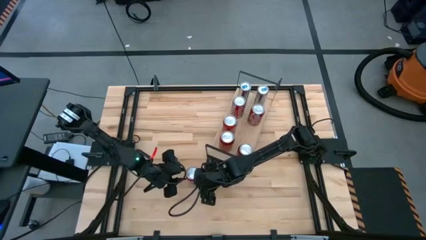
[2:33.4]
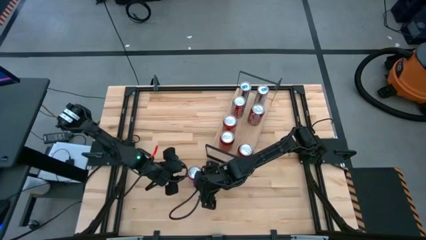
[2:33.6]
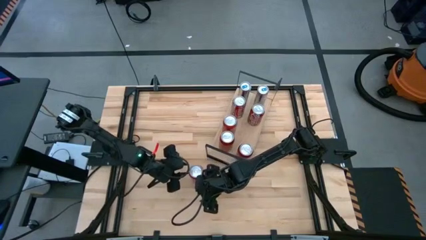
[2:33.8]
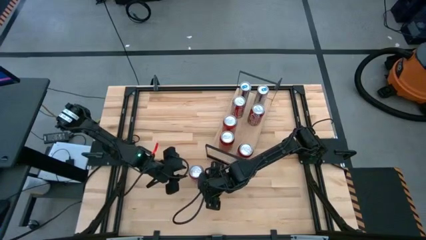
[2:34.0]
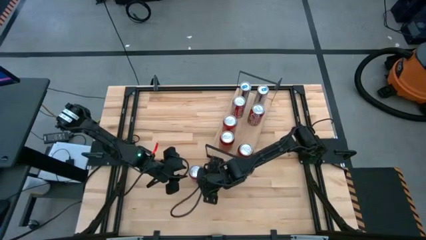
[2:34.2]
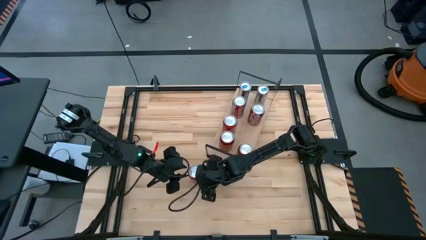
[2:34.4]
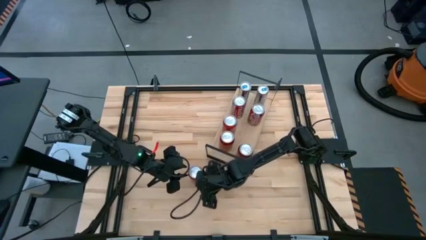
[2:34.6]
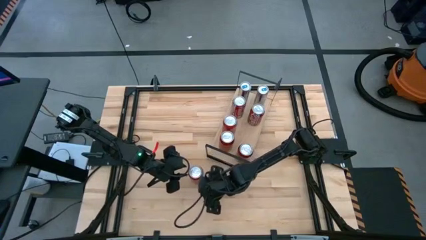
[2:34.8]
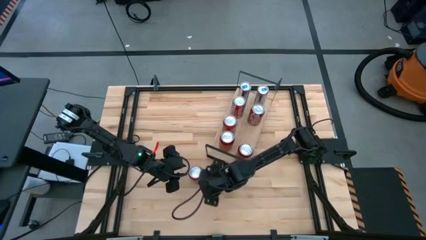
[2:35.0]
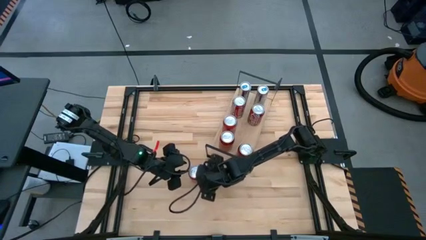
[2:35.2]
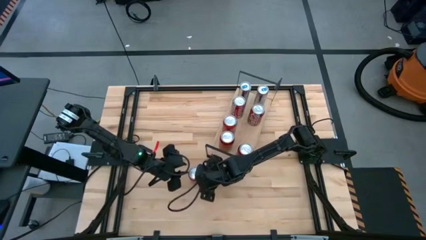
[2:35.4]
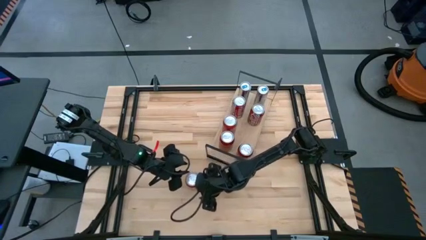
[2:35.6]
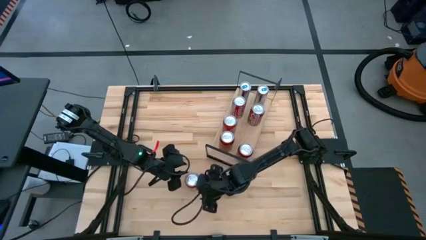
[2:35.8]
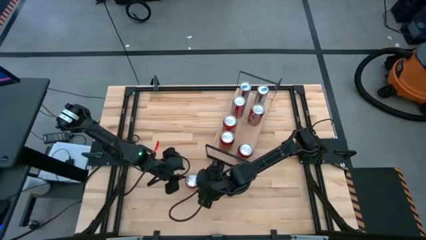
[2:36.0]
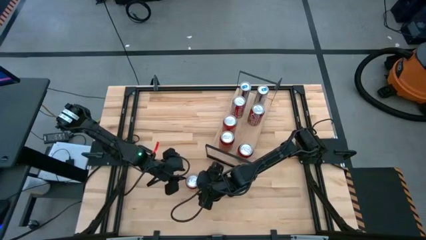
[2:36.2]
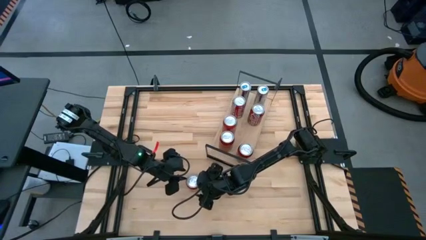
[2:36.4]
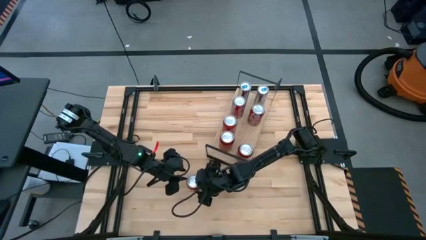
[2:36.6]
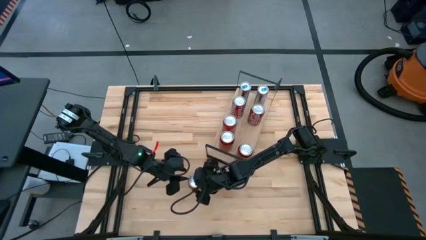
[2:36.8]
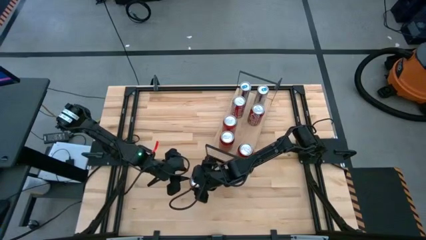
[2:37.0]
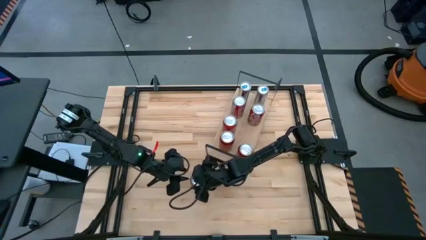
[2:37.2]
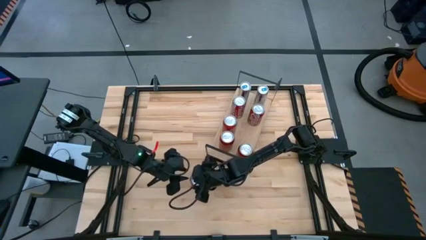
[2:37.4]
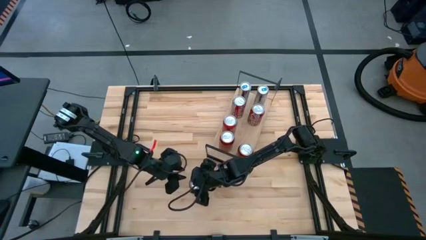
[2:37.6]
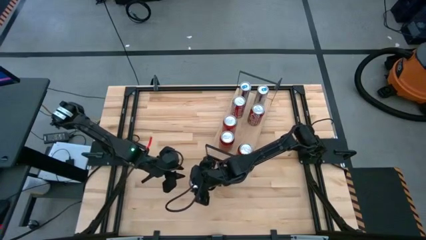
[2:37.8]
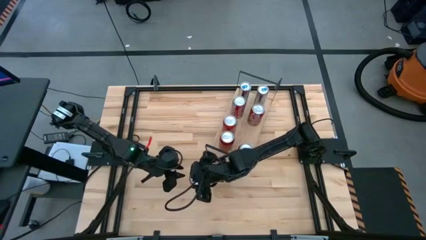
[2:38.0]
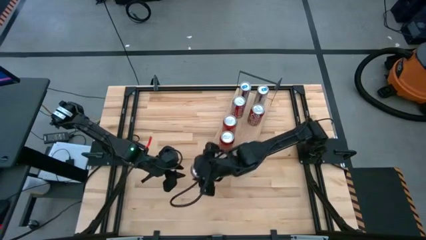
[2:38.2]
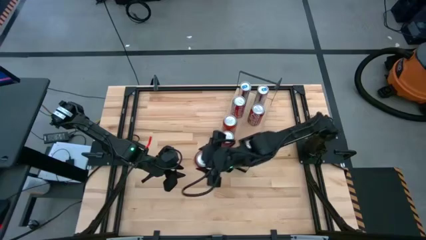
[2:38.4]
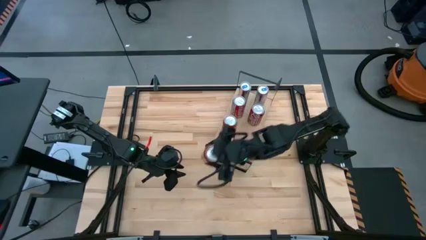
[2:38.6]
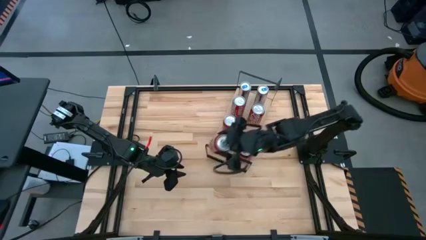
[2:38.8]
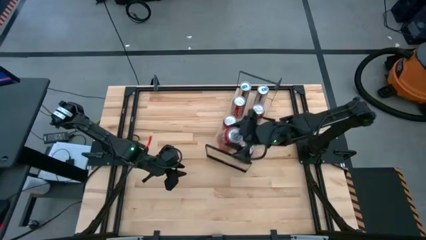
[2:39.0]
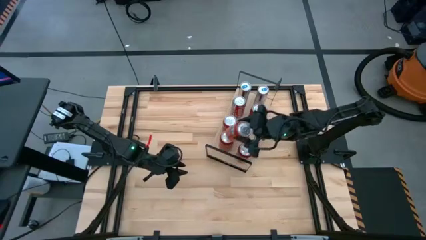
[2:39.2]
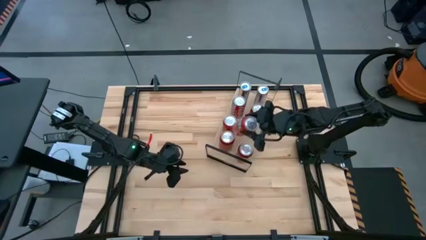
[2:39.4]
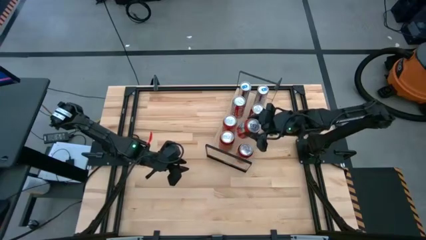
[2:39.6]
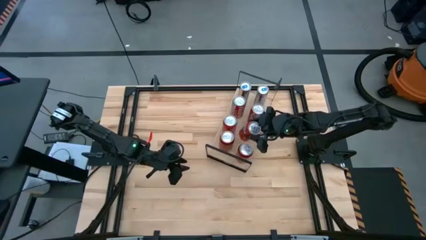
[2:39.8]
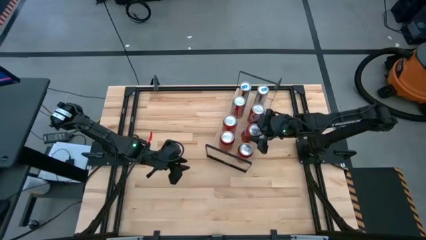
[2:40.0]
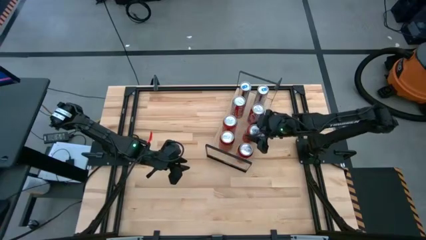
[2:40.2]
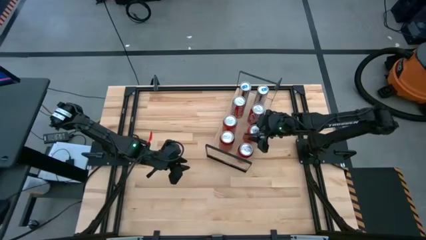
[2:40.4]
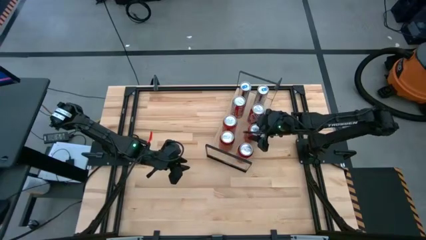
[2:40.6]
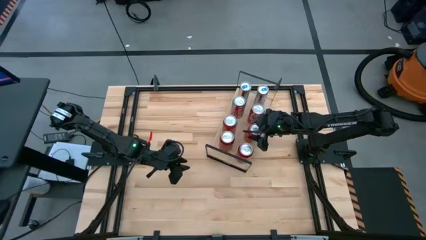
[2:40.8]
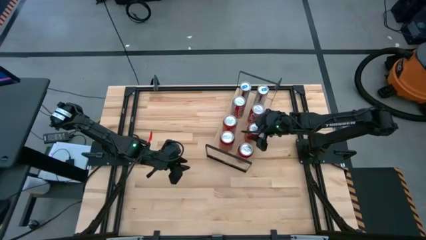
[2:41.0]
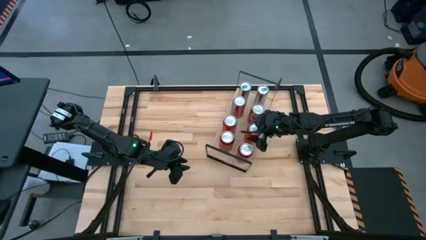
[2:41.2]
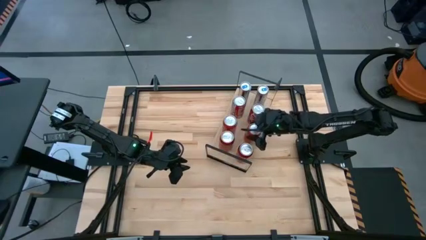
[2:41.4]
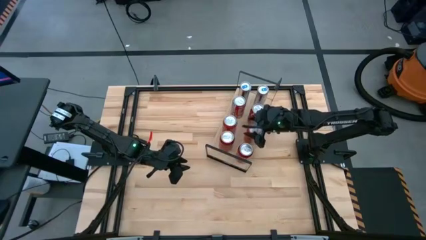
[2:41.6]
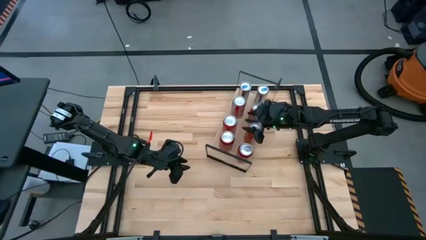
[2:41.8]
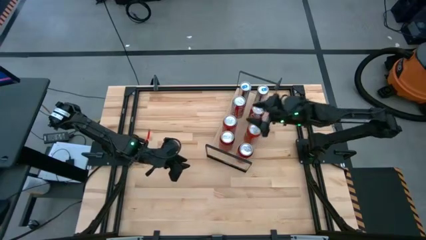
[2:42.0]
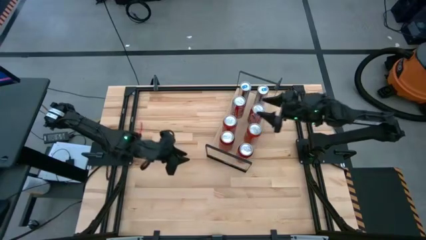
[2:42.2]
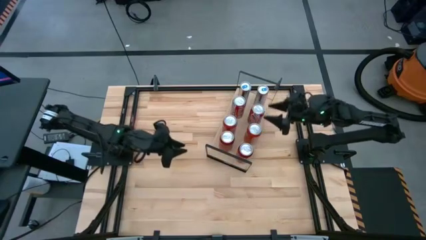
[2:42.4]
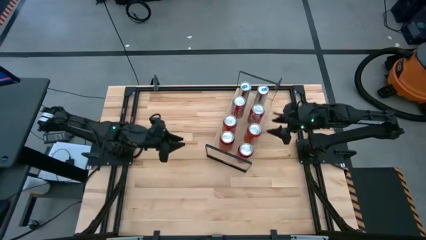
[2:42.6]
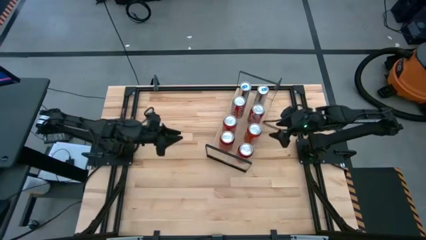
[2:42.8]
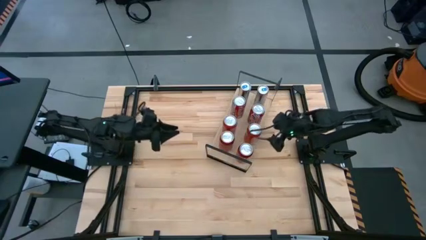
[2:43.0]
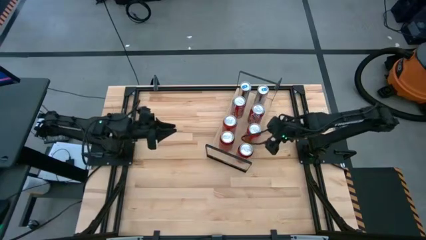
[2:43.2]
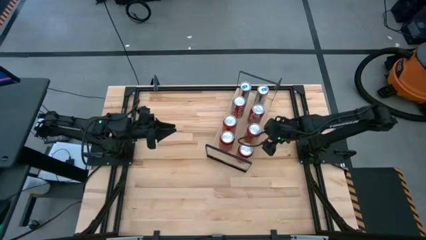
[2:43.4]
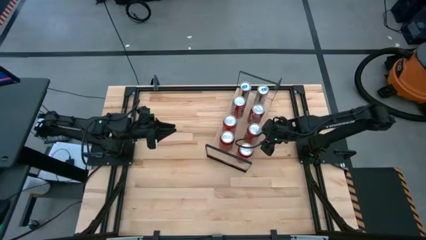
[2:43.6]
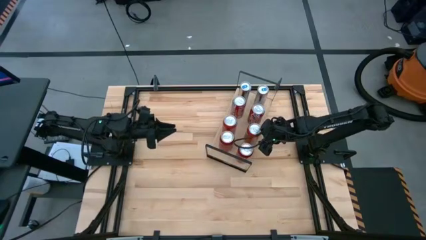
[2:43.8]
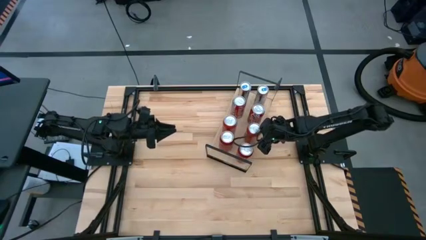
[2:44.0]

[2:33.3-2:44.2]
Task: Place canned beverage on shelf
Put the red soda can on the shelf aligned with the other red soda can

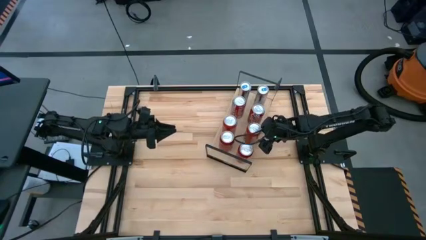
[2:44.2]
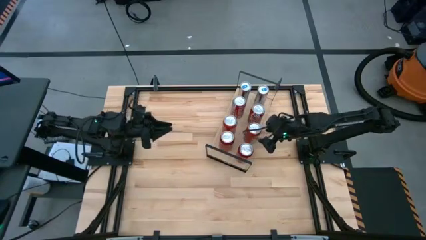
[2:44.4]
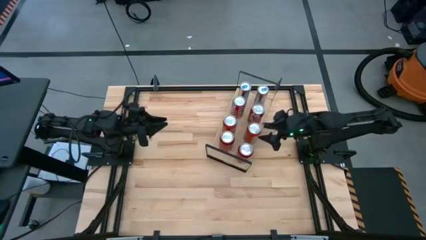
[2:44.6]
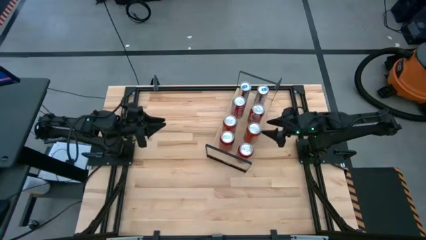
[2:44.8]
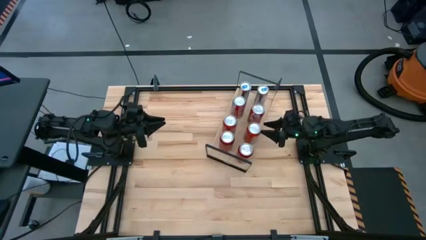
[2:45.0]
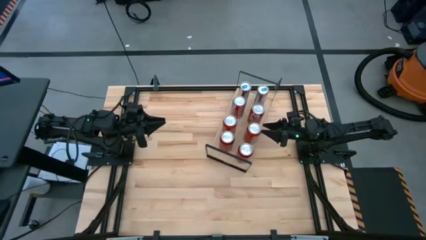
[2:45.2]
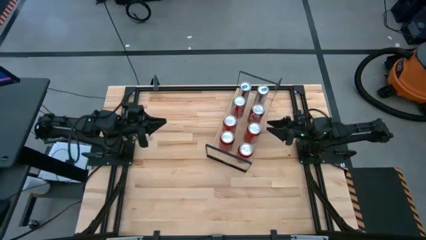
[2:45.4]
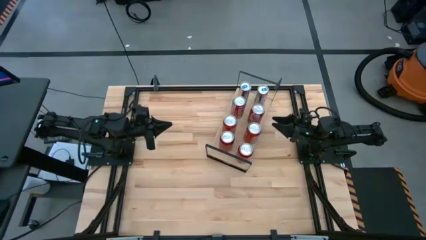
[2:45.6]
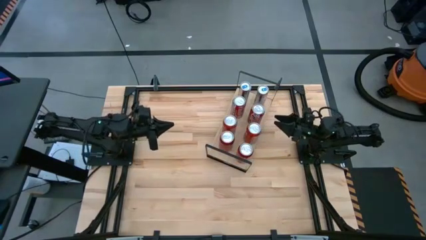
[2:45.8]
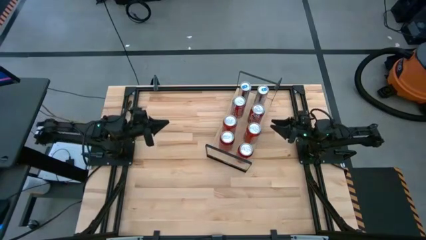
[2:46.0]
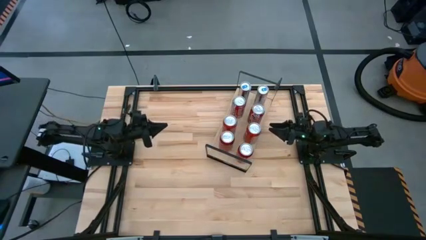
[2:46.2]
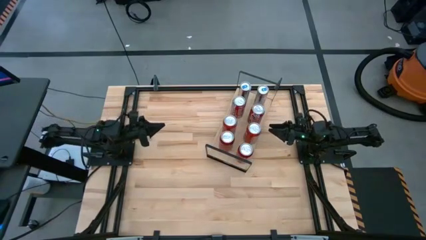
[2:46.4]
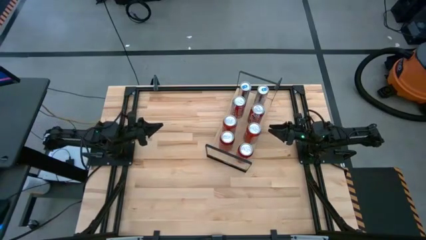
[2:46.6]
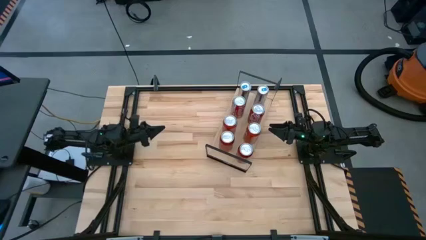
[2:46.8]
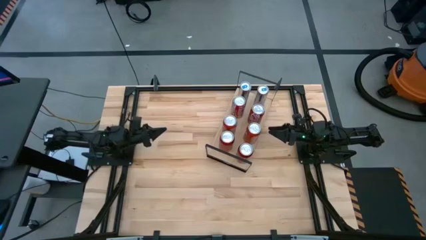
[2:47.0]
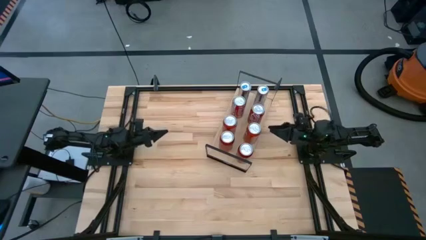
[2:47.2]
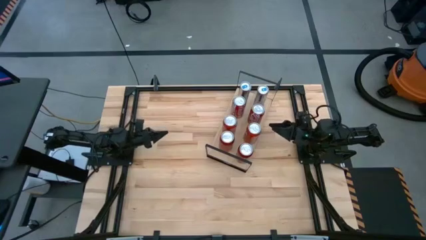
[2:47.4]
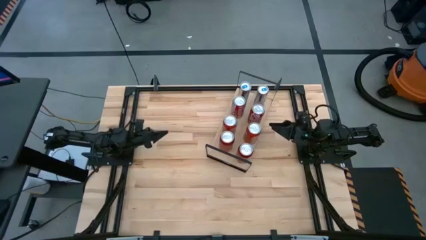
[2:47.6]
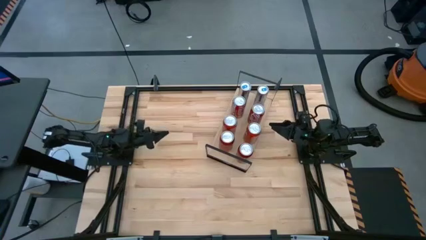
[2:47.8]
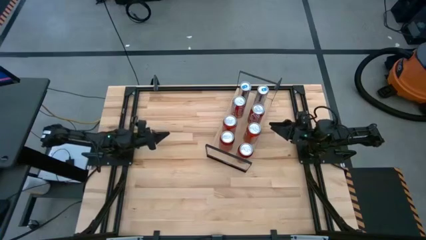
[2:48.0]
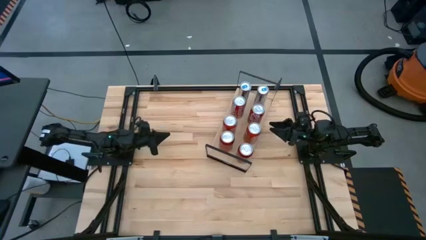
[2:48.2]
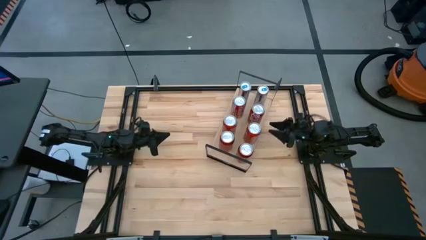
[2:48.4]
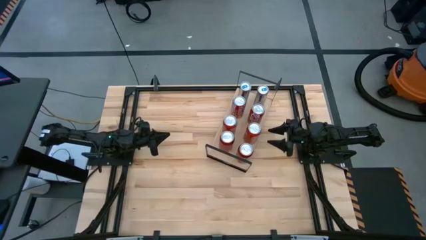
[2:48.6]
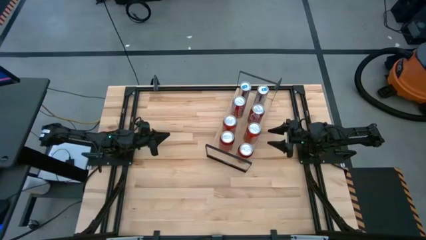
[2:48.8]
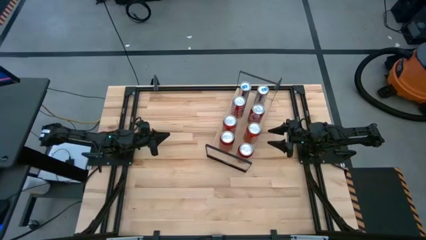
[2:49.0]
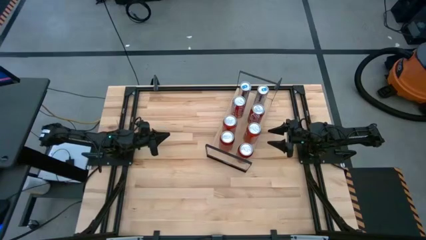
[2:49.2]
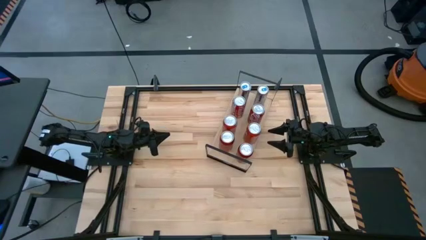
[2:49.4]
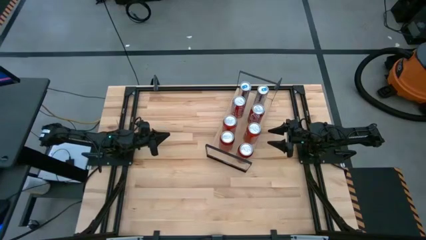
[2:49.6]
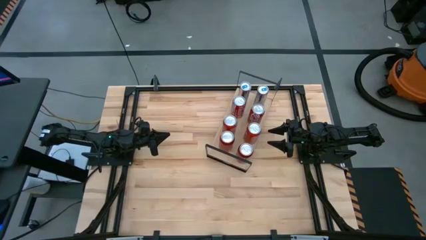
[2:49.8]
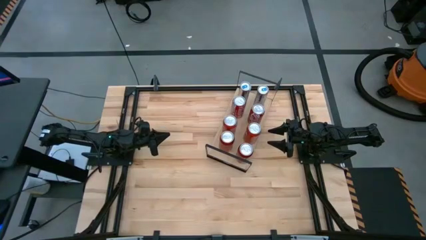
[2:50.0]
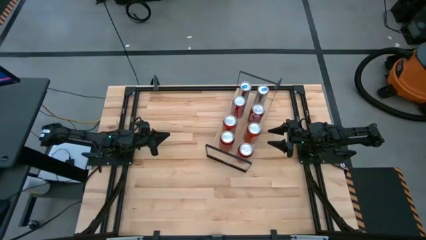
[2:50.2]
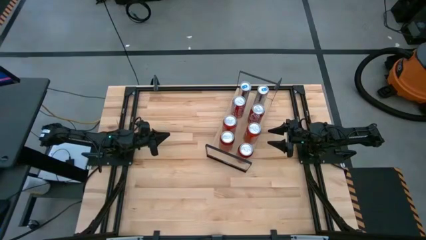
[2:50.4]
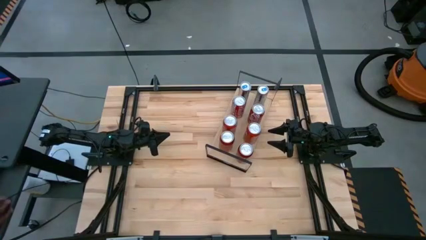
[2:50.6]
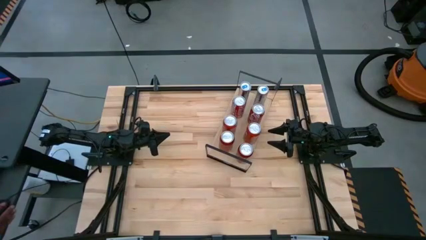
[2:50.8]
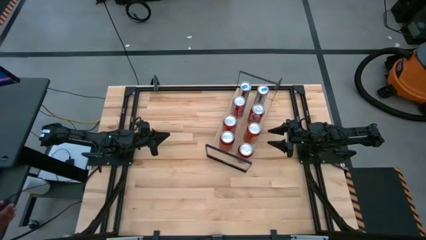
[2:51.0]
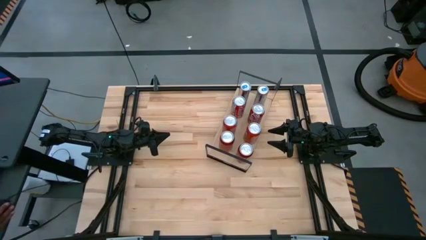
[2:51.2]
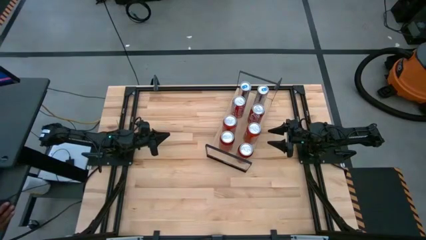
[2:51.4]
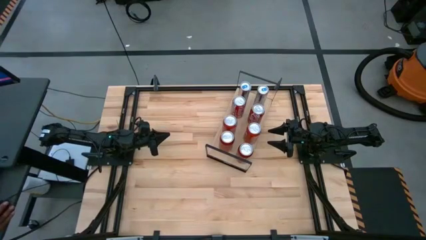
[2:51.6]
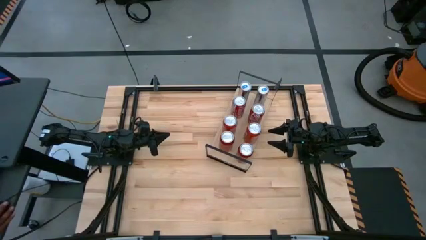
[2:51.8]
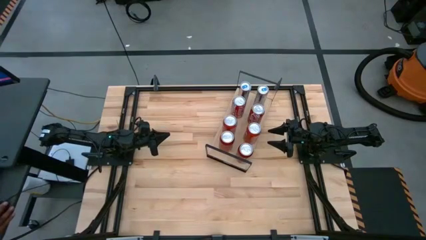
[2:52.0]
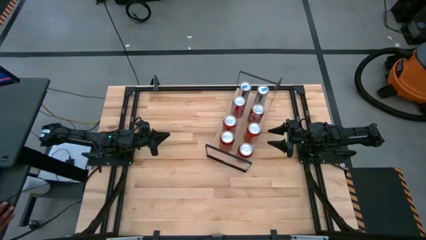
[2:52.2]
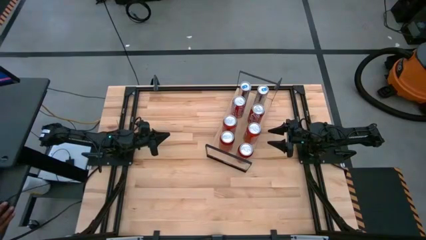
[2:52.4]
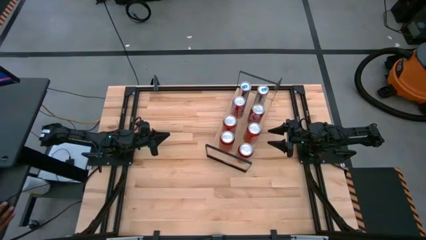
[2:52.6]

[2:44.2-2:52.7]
Return to Home Position
